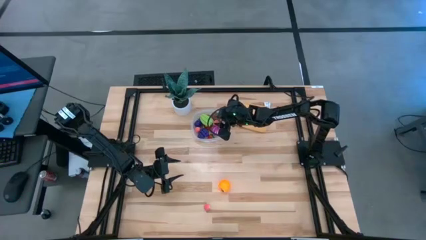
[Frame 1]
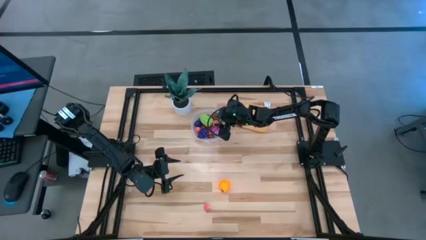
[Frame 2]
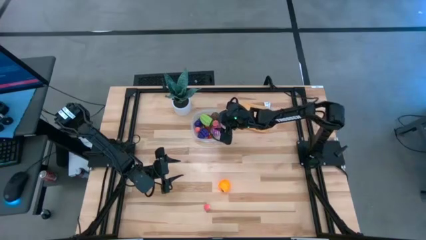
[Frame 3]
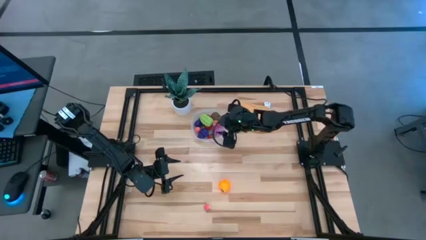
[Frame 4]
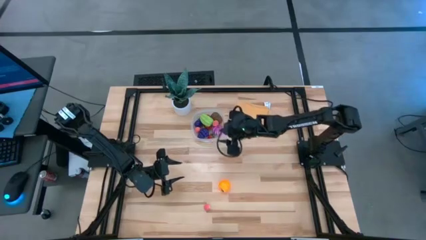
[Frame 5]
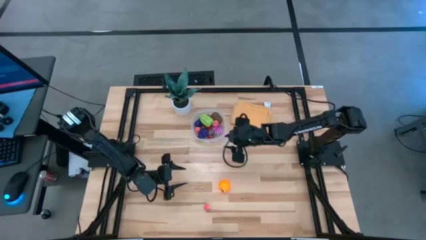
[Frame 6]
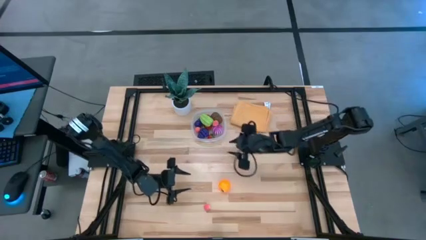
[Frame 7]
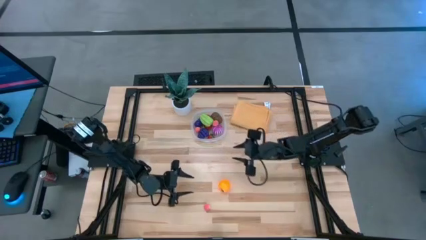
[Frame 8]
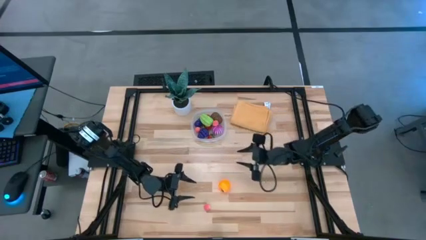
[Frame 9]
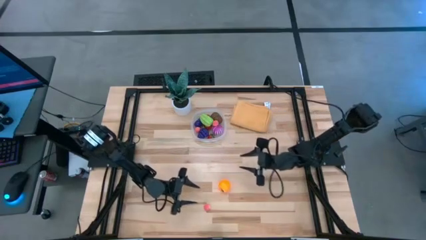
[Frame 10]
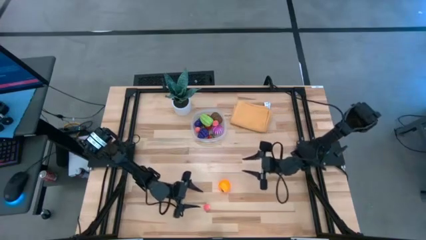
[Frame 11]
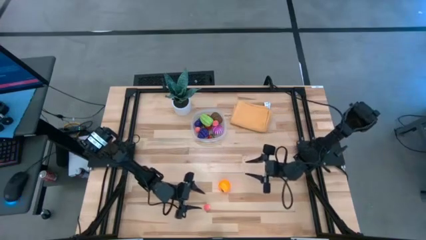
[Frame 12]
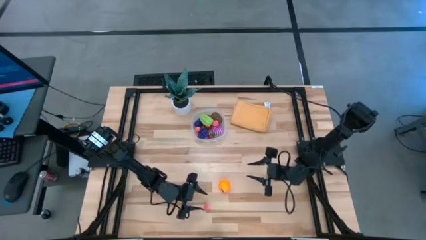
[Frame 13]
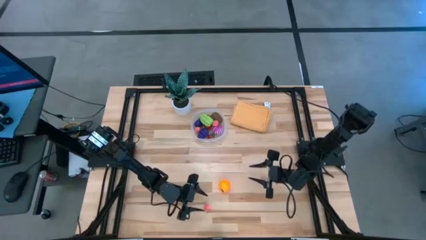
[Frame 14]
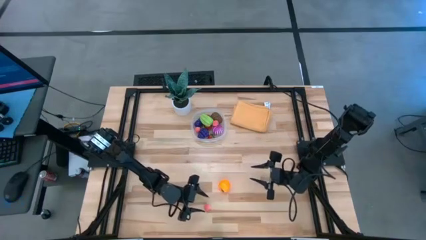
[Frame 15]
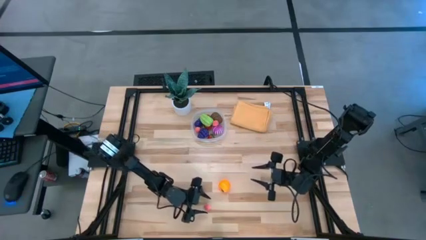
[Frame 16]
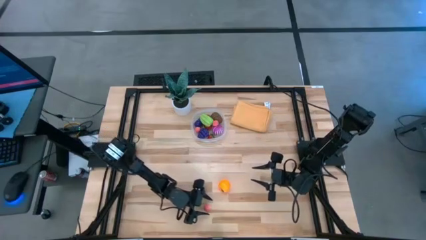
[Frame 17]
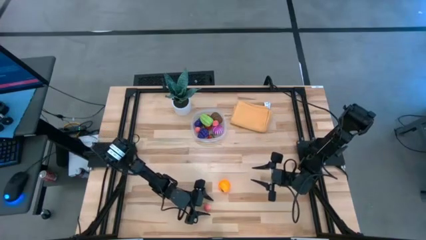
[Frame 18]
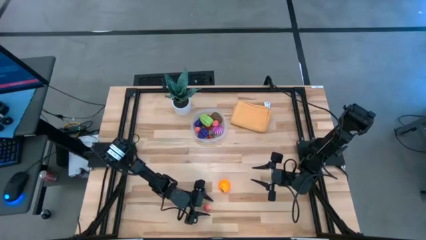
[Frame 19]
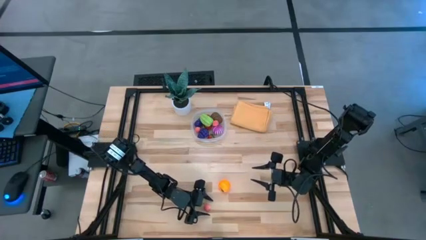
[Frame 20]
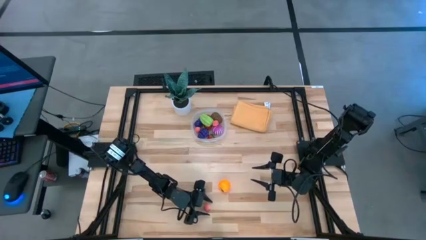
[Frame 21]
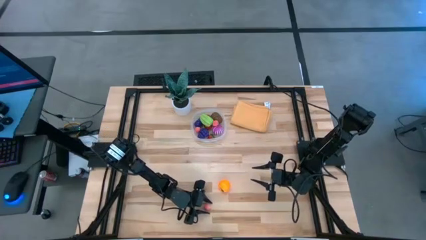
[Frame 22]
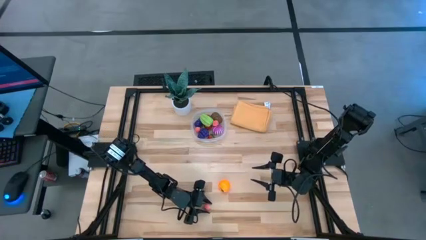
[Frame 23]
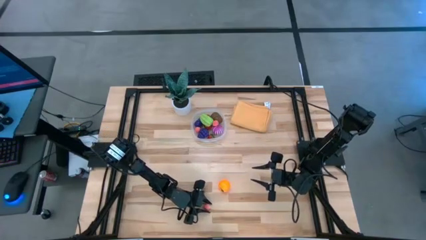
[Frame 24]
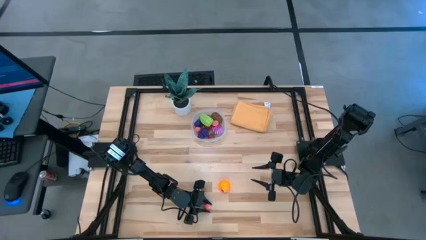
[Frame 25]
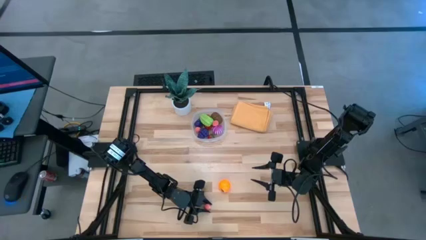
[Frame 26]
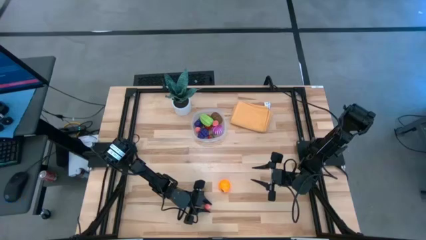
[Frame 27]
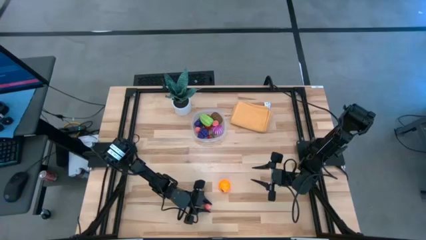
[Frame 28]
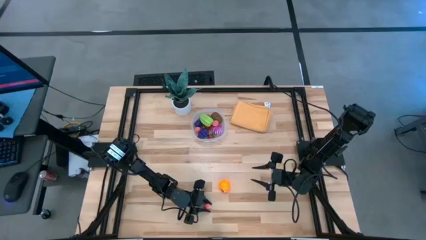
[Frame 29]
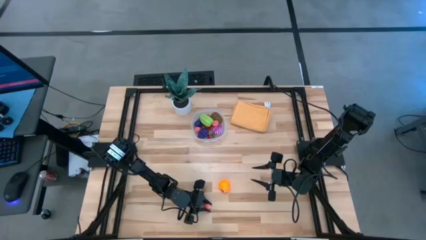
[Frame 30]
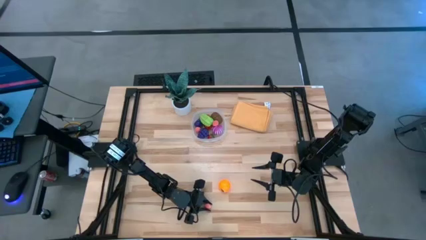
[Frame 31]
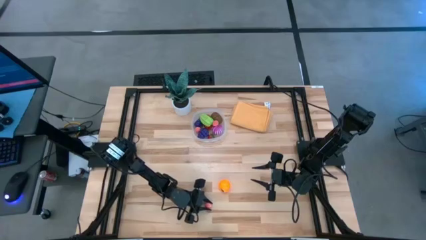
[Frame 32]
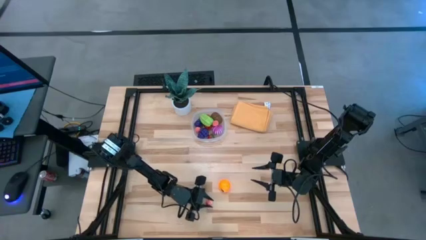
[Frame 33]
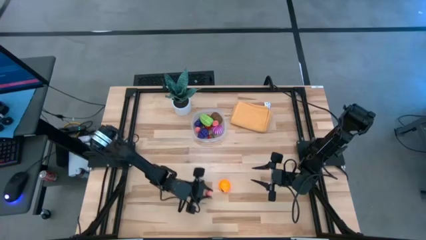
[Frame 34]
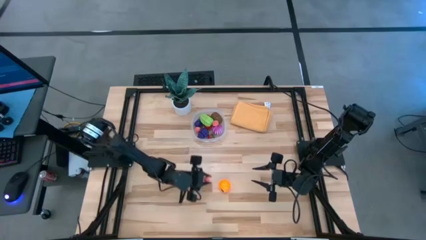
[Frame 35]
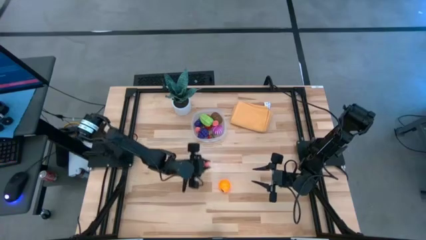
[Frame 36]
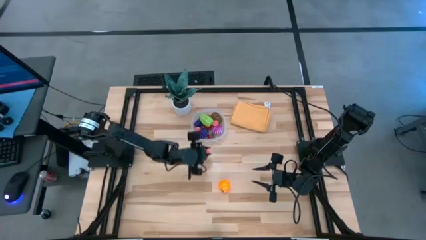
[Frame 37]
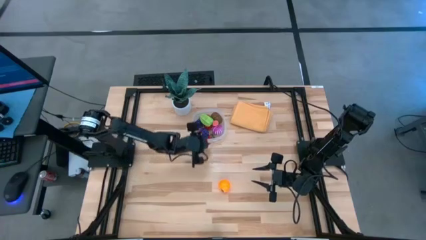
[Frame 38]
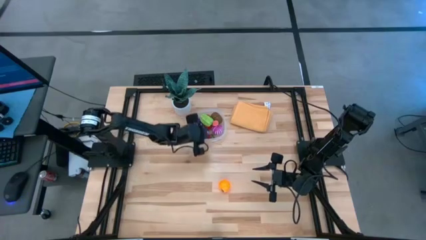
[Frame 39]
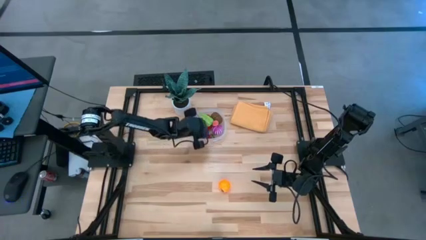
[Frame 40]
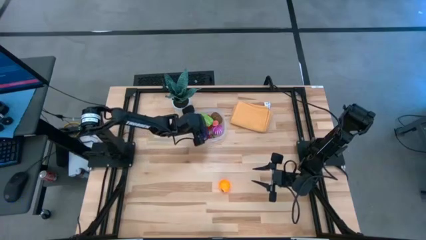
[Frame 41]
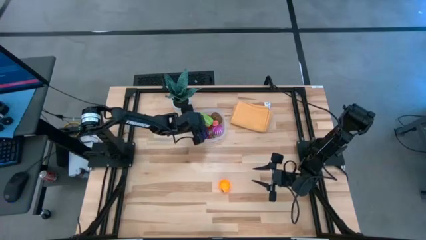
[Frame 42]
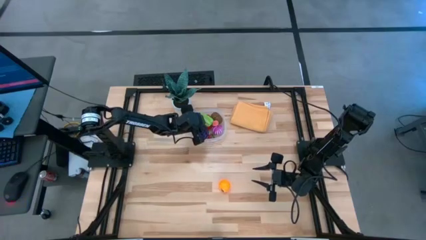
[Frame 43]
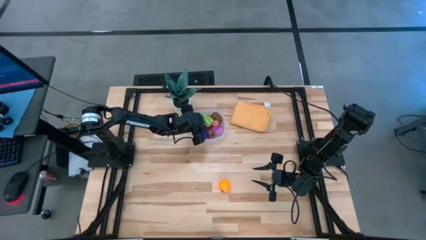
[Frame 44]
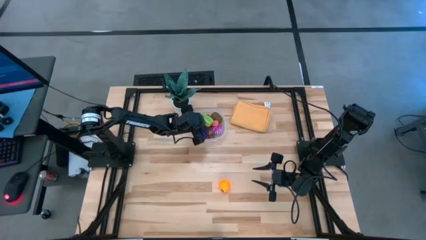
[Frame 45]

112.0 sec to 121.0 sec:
Task: Pick and placing Produce into tupperware
Put the pink peach into the transparent bin

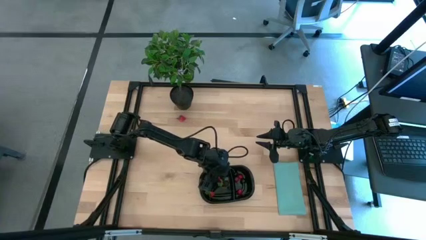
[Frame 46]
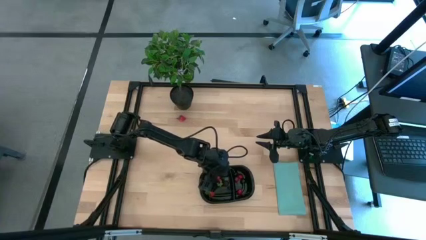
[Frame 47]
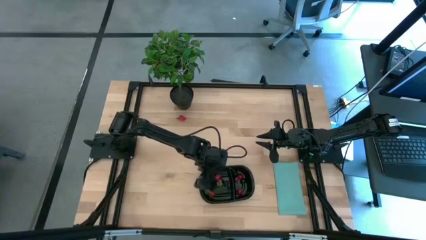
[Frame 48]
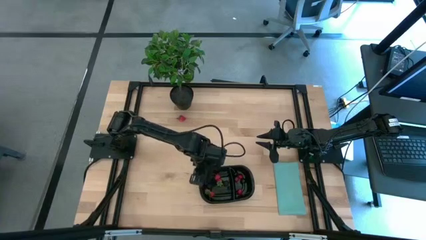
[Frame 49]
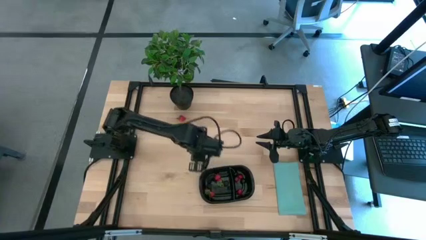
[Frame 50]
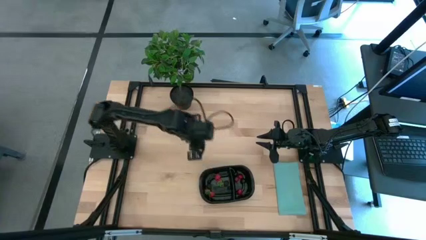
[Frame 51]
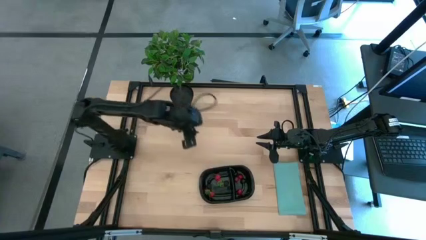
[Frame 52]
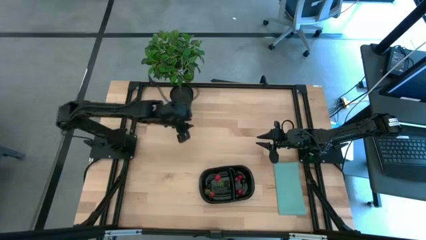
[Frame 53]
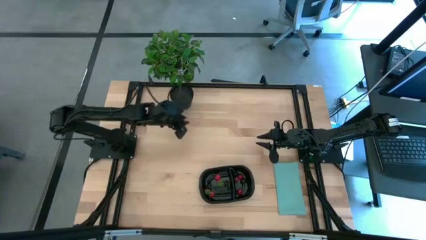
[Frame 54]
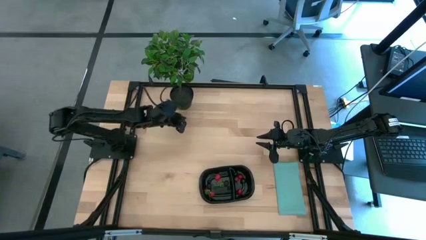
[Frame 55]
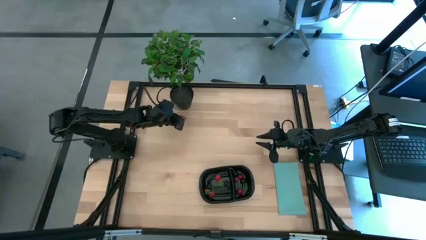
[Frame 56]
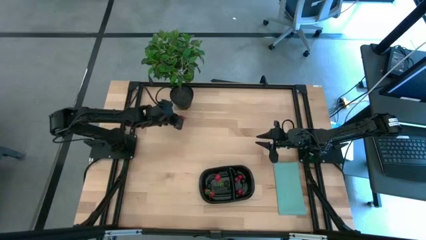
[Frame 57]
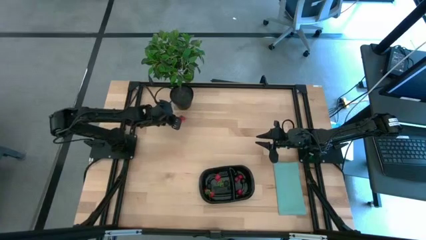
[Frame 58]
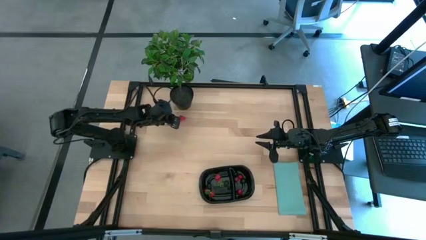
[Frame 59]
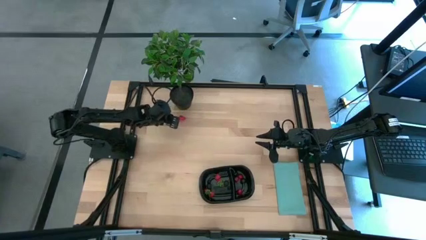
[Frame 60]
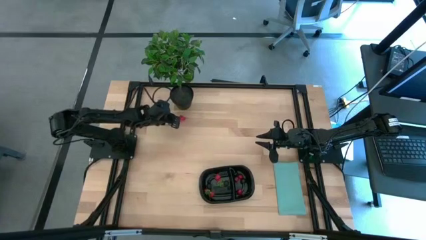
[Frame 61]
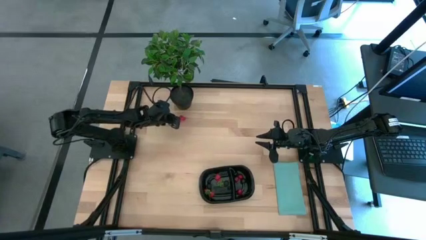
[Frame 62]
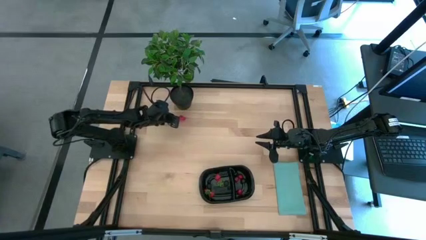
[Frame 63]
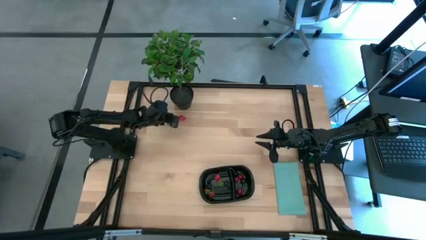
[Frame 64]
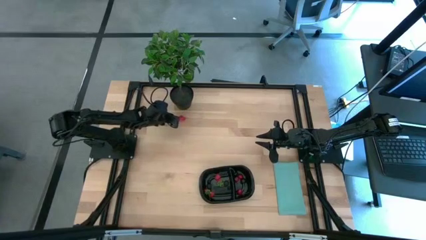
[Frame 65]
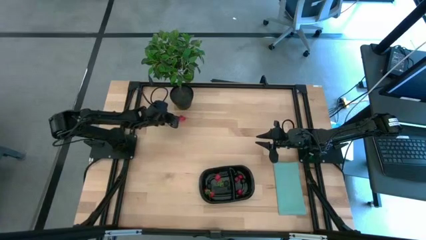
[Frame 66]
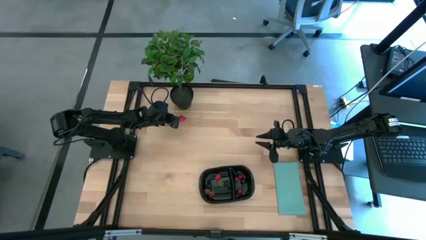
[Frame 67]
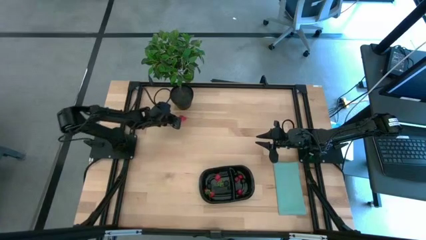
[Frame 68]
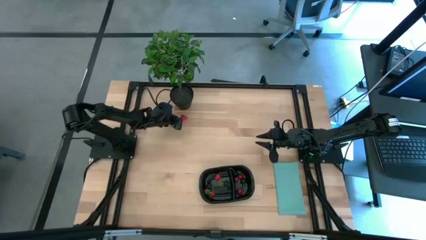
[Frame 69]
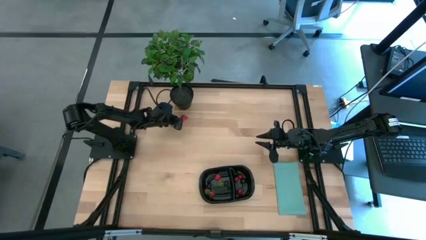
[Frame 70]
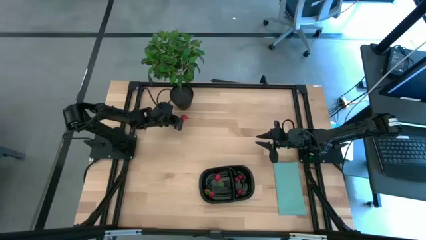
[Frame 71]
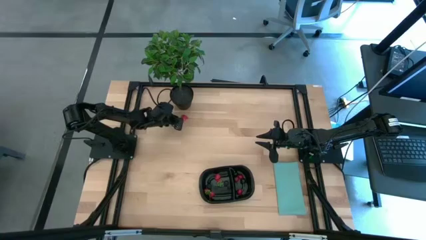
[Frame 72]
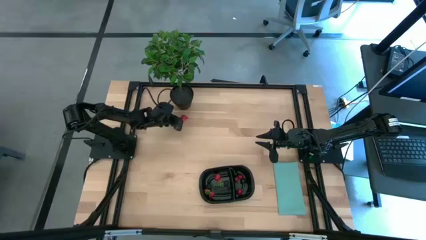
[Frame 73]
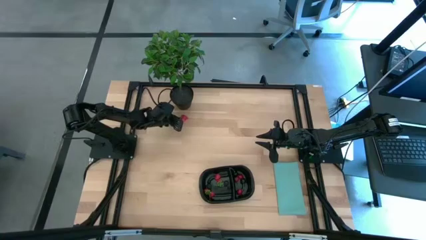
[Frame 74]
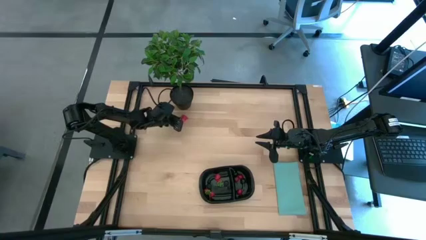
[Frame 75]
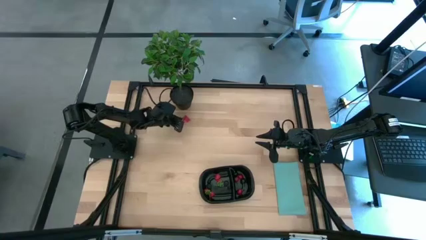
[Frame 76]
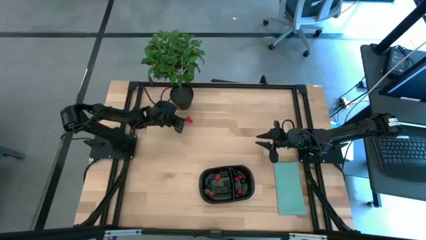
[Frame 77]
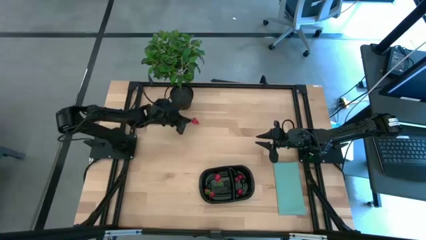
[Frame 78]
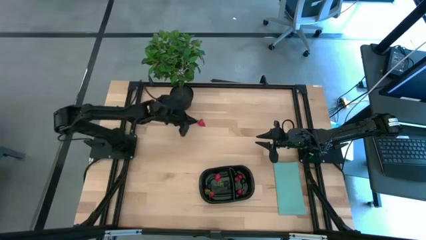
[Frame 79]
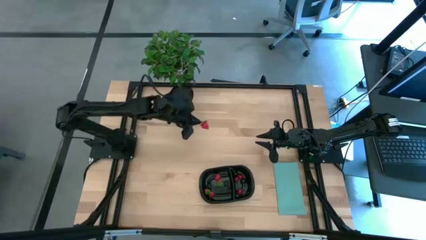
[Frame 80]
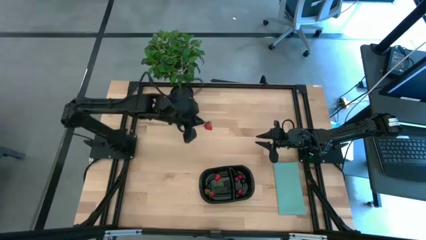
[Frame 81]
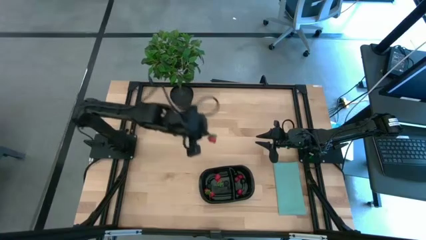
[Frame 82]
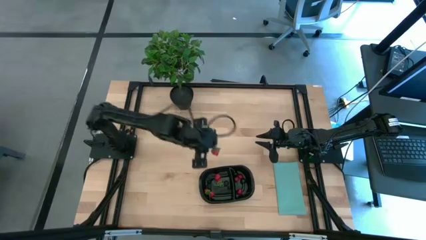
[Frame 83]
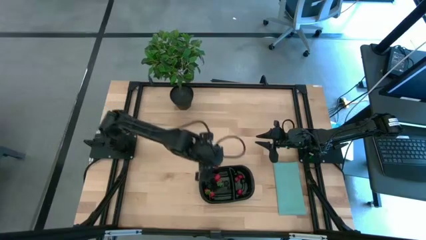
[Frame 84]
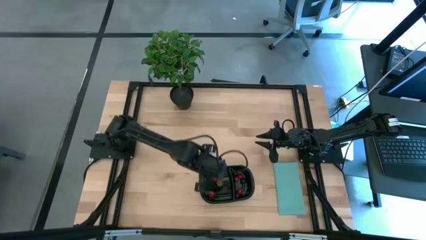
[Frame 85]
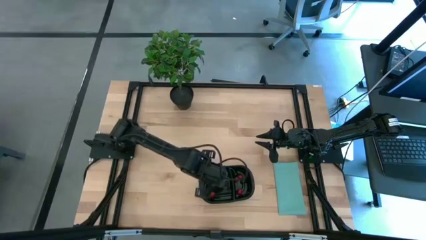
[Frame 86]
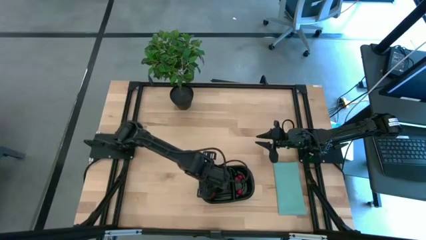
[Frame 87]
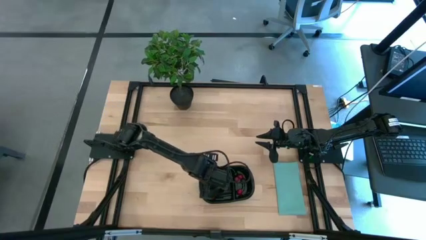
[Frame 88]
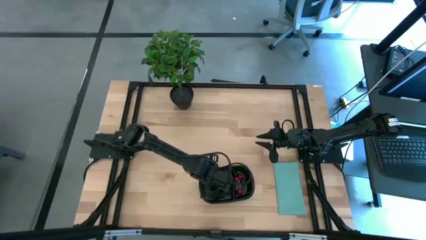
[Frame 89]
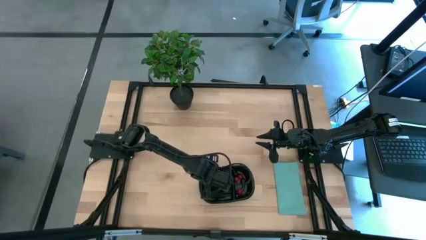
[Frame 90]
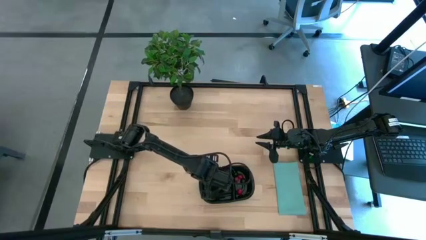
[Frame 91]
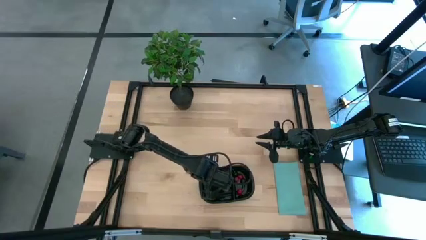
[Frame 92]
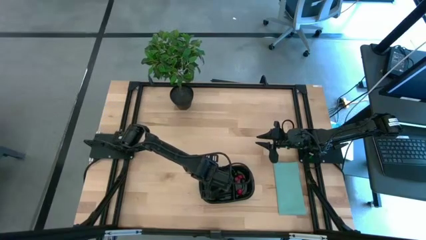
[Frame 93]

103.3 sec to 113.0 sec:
Task: Pick and placing Produce into tupperware
Put the strawberry into the left side of the black container
